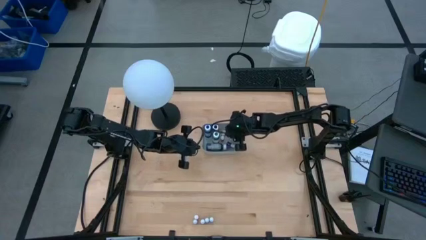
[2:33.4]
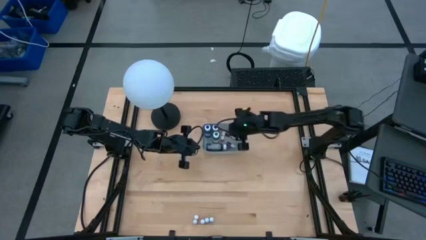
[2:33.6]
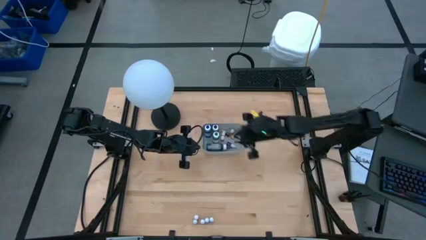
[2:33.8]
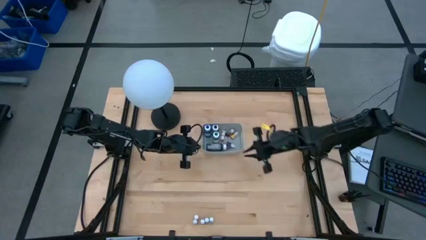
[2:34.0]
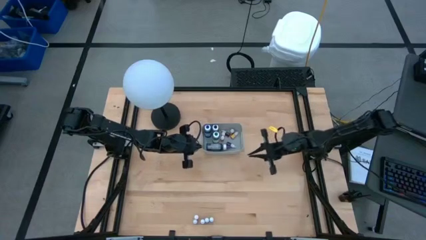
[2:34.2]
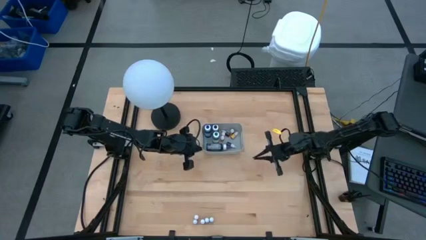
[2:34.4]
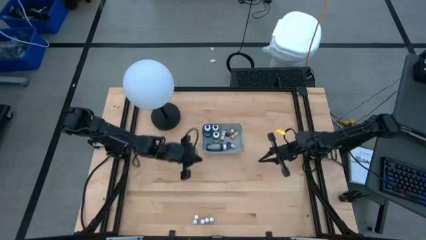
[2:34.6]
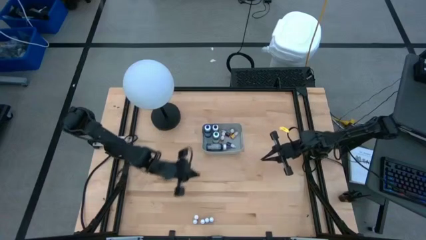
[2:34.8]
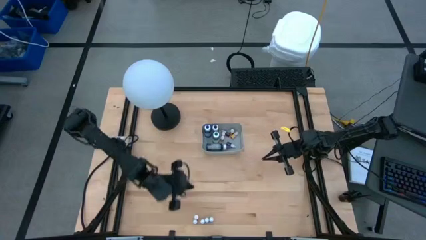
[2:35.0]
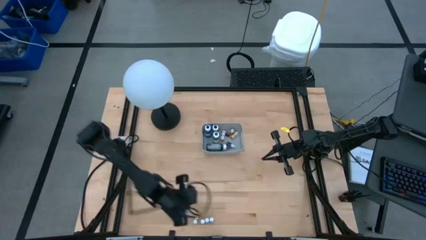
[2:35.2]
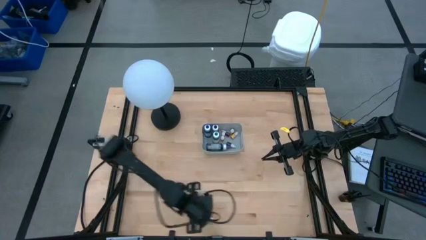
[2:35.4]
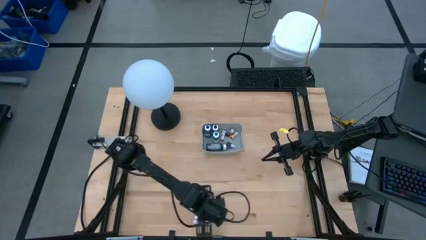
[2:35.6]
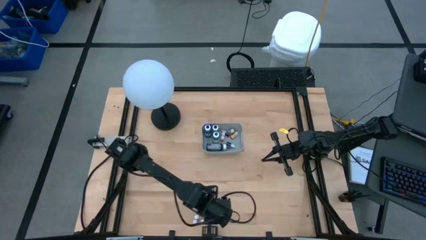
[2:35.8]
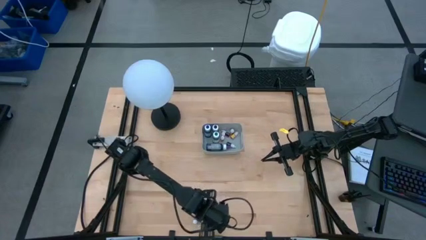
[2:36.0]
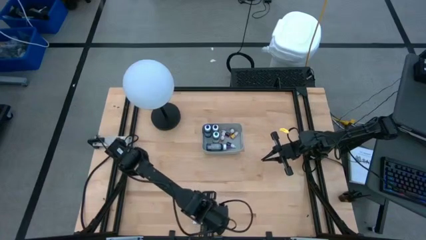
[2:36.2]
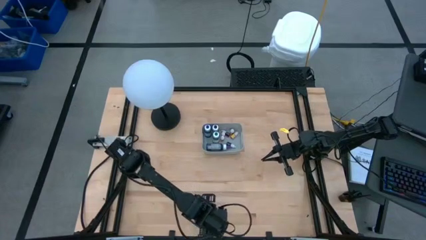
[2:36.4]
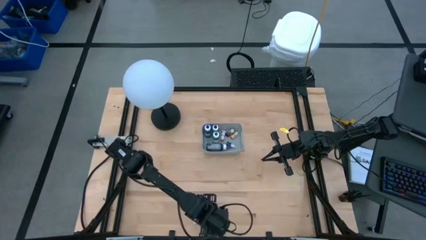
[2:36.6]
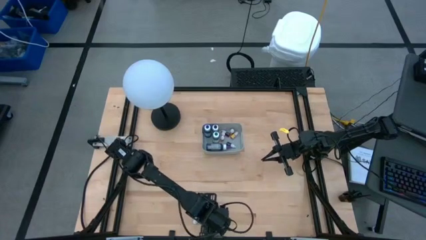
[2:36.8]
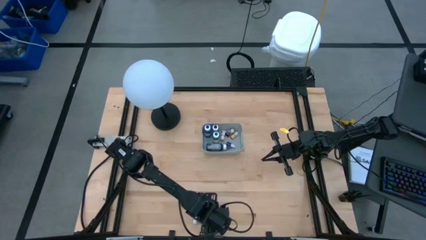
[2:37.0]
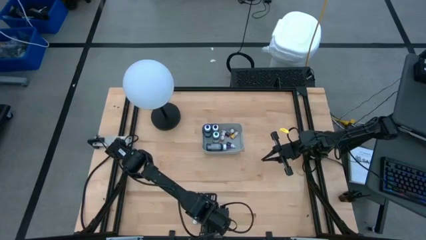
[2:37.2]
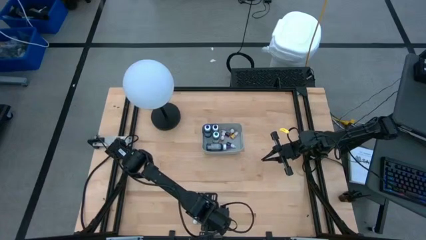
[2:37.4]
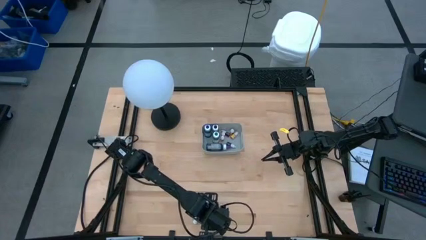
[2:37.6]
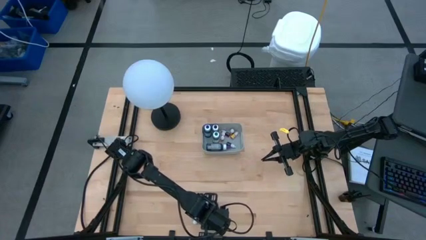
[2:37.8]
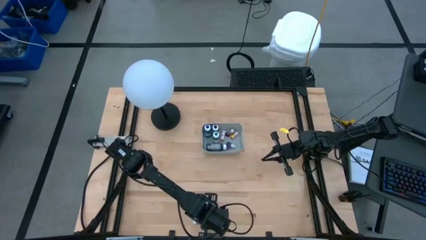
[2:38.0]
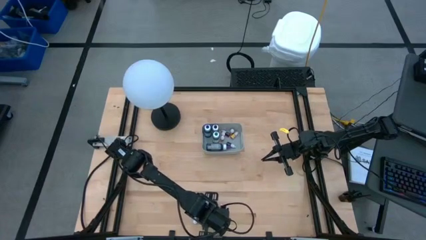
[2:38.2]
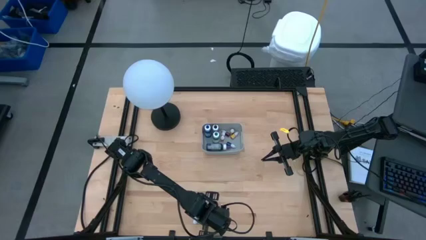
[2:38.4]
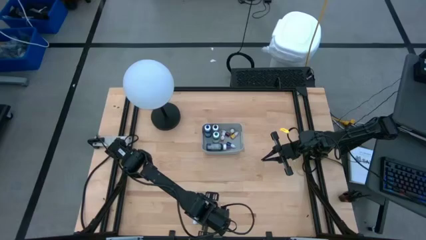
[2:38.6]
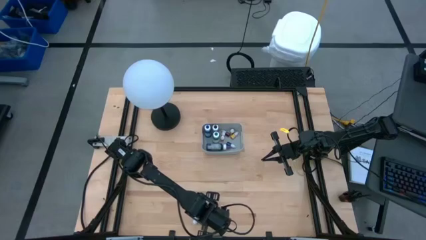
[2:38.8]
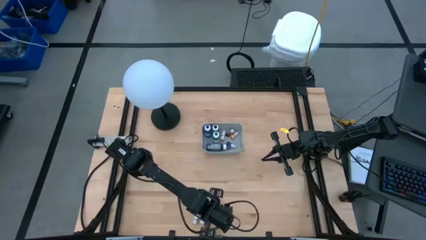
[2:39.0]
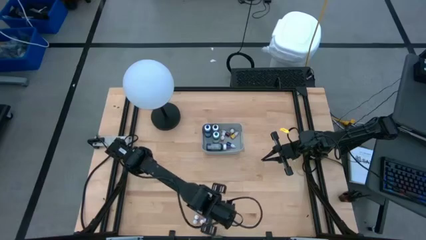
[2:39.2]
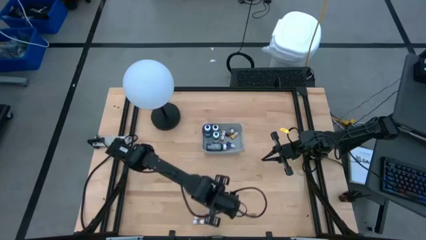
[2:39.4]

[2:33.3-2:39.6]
Task: Pick & Place food coloring
Put the right small purple food coloring bottle into the gray bin

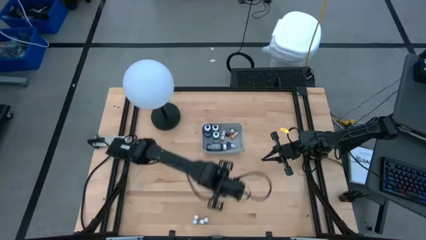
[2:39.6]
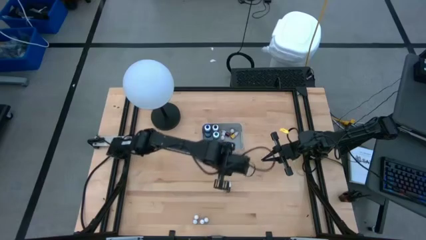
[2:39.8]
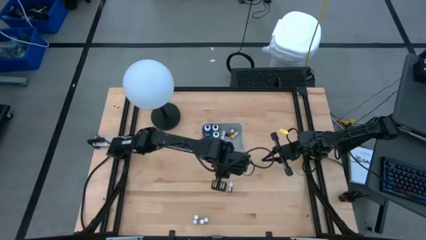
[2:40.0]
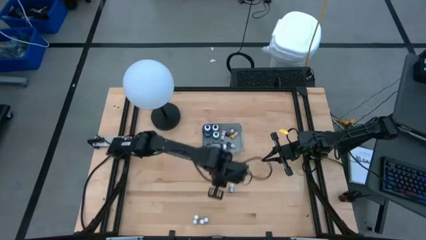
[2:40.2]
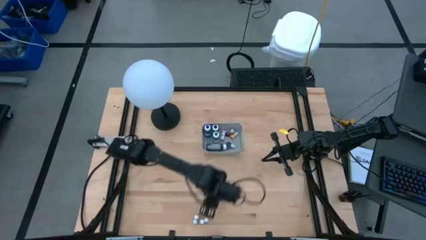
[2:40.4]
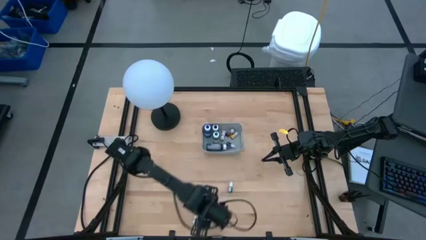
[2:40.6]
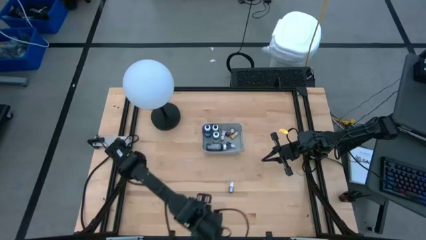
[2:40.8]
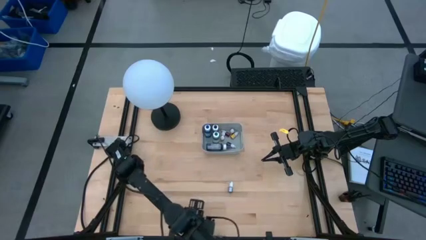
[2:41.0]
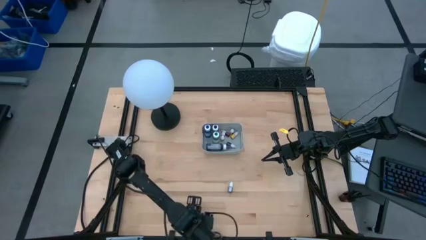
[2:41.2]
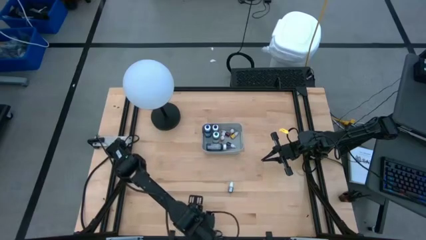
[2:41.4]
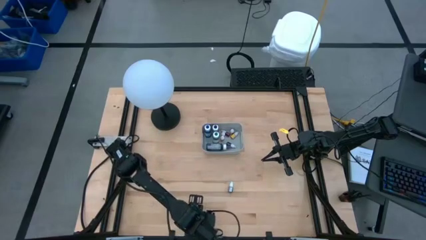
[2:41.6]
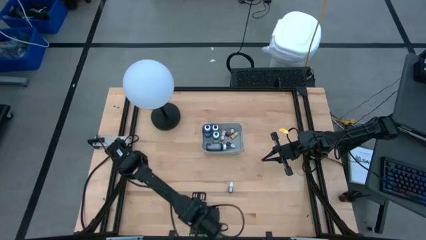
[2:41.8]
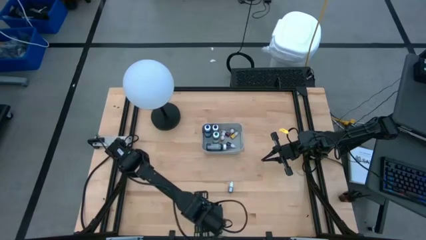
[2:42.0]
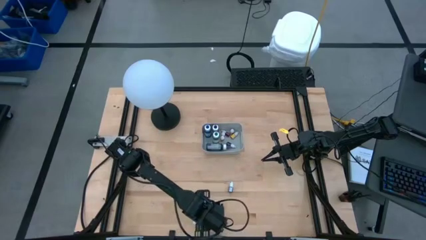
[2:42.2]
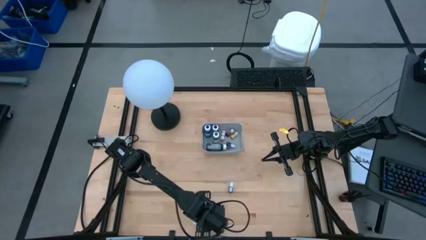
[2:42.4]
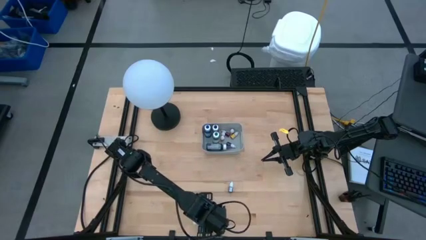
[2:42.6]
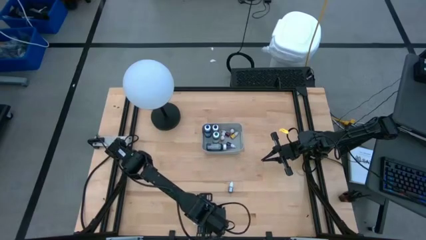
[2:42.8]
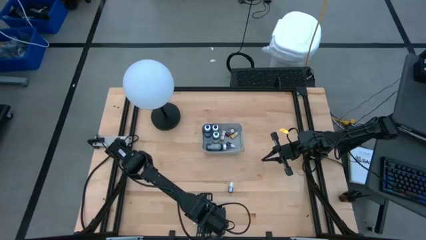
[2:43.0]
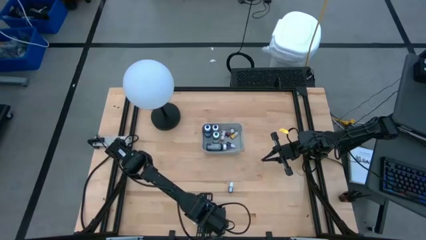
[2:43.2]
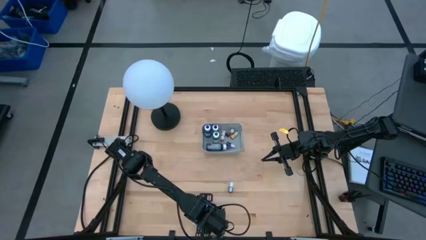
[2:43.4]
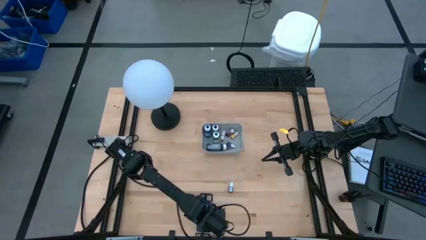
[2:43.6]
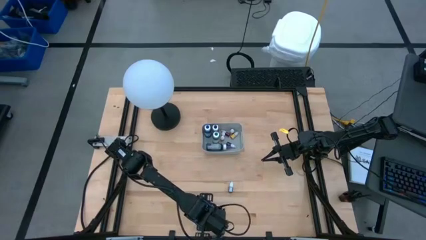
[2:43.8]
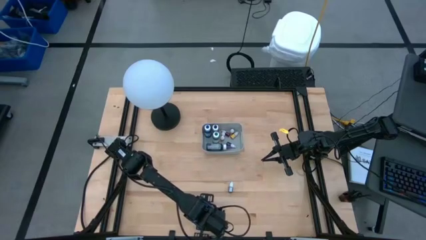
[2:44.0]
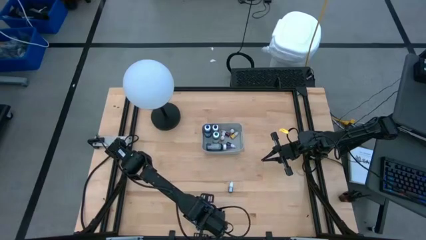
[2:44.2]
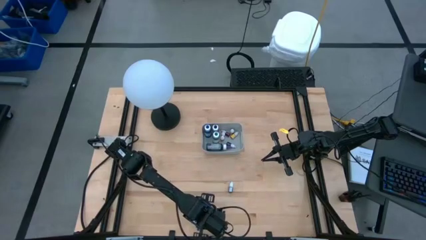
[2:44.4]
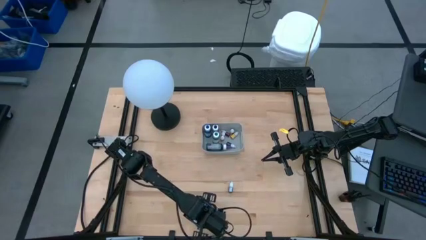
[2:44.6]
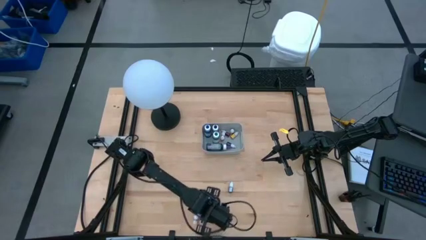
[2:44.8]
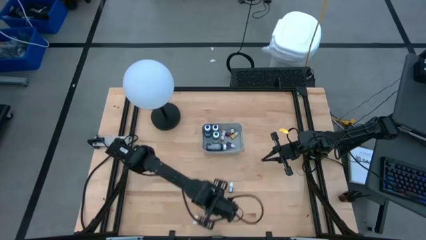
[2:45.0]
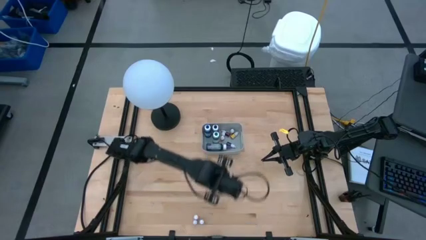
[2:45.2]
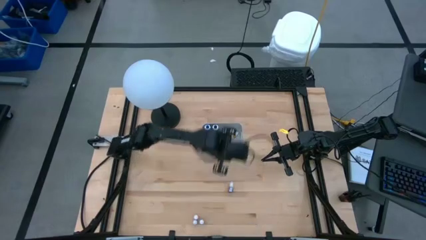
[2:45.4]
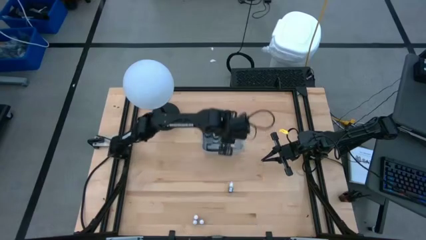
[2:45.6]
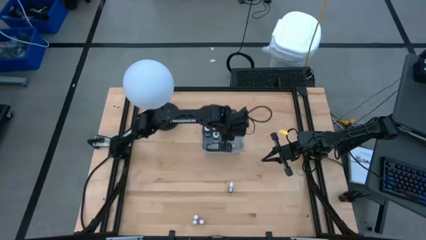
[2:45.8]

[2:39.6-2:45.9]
Put the left small purple food coloring bottle into the gray bin

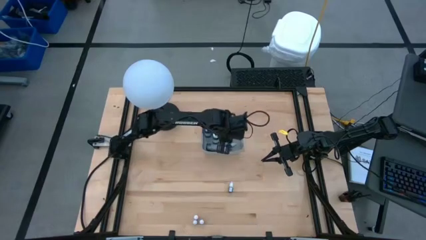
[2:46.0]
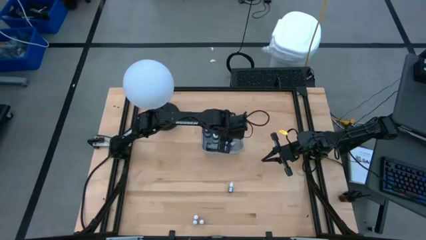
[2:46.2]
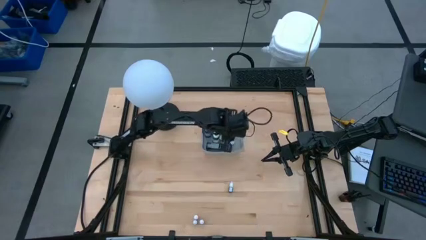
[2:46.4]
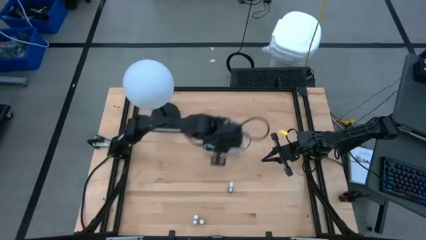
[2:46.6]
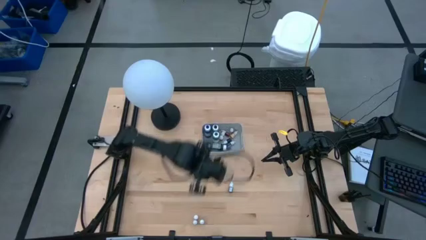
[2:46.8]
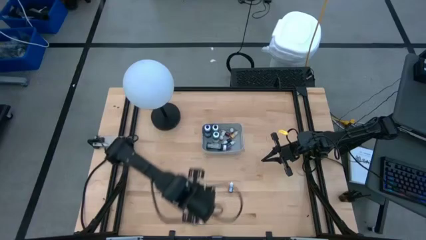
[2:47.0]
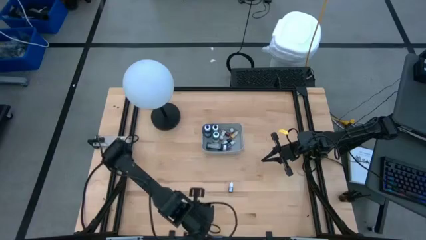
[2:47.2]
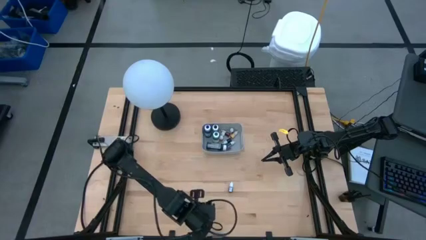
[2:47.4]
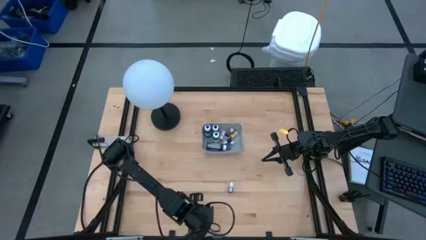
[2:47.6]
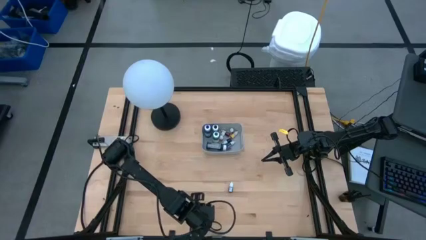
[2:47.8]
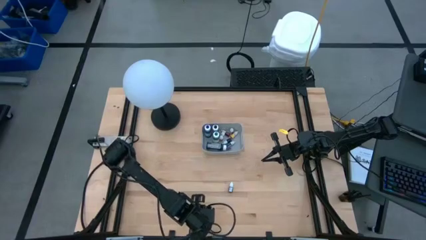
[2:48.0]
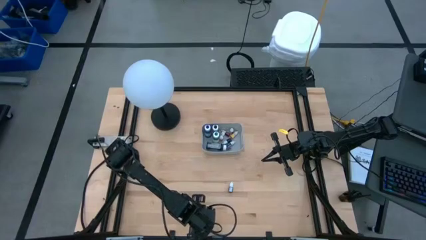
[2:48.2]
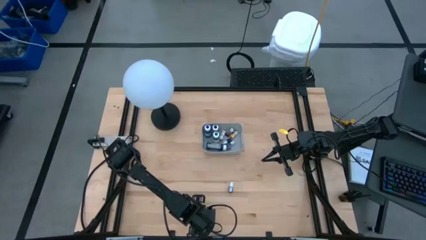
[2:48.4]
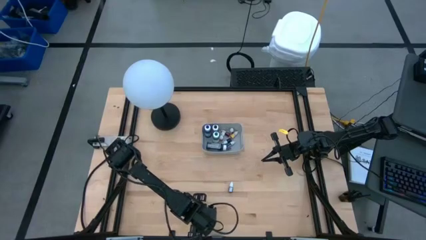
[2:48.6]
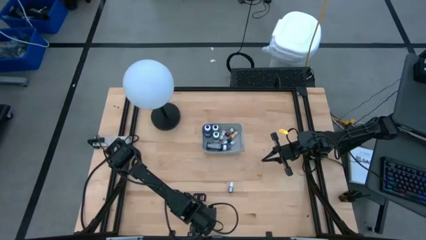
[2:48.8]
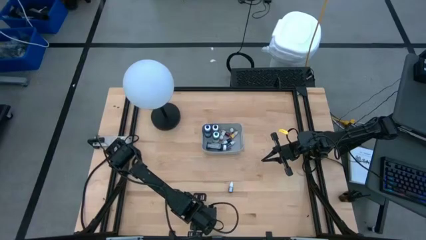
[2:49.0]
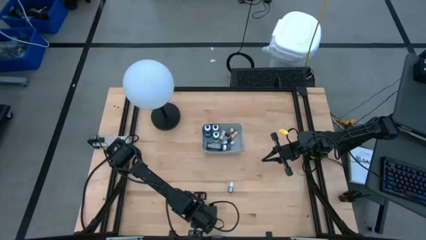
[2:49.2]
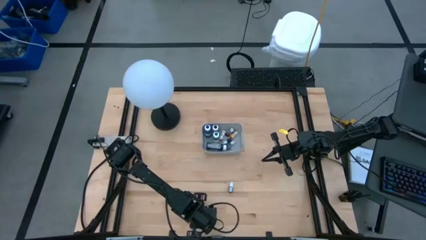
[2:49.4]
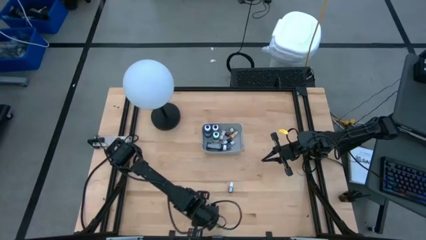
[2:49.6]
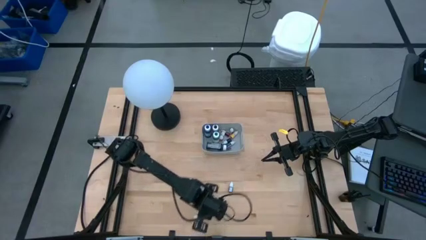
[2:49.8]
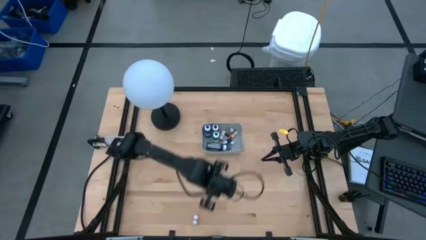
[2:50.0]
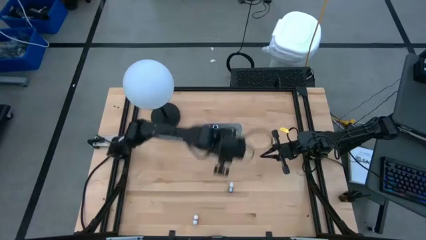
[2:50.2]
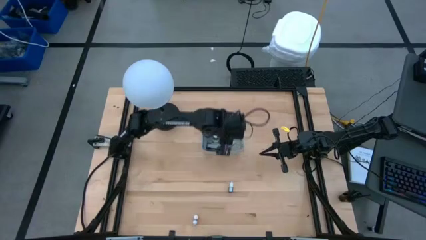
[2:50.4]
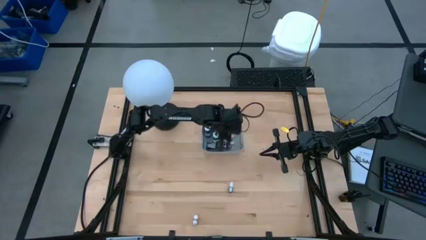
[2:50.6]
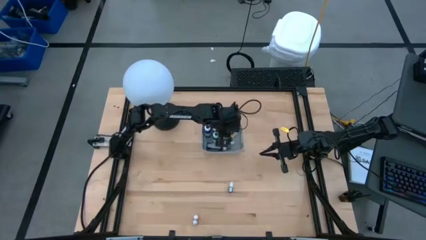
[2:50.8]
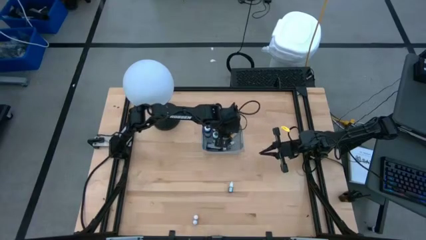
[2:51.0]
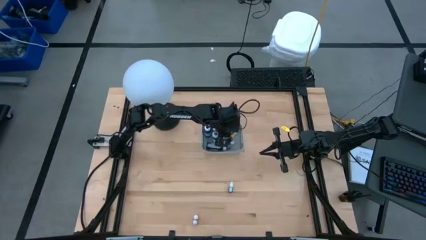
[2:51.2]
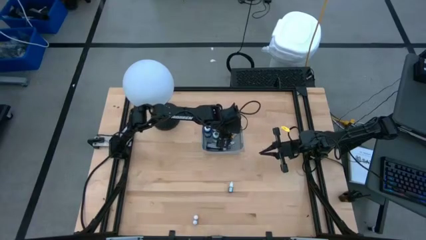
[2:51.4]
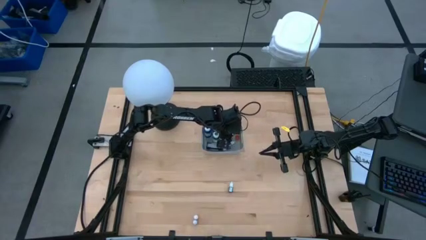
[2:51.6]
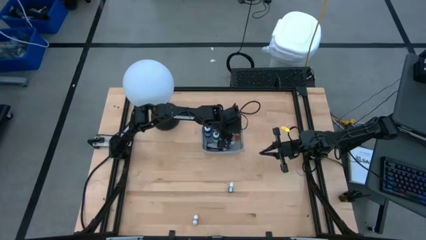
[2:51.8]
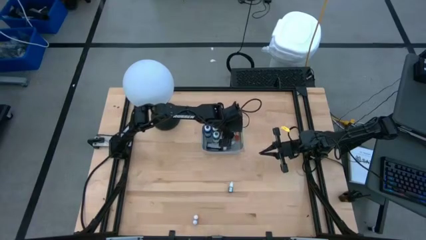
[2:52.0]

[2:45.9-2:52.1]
Put the small black food coloring bottle into the gray bin
